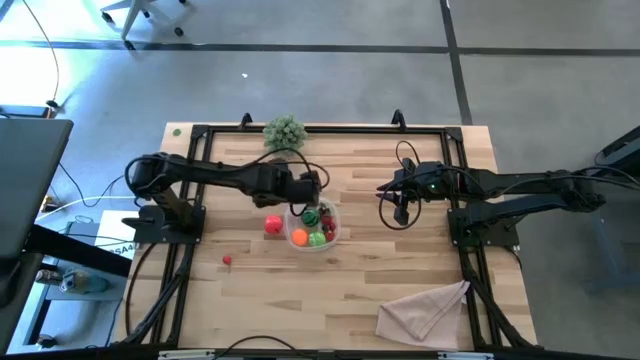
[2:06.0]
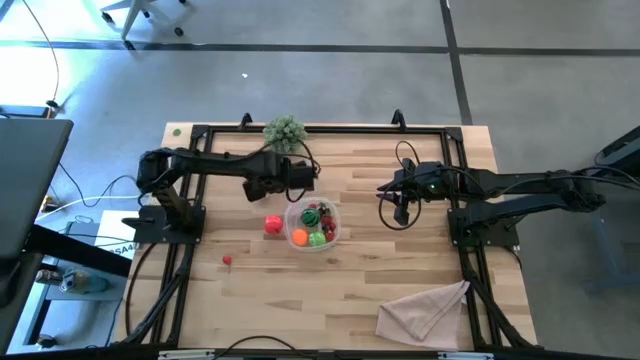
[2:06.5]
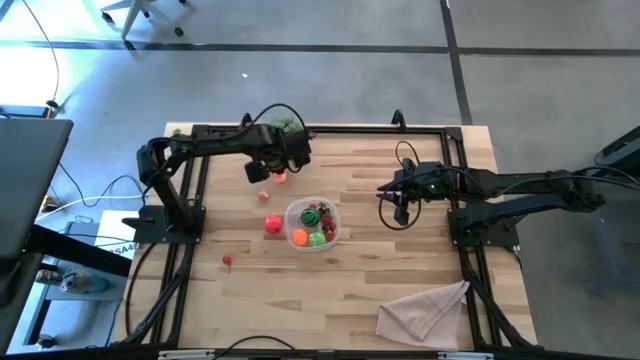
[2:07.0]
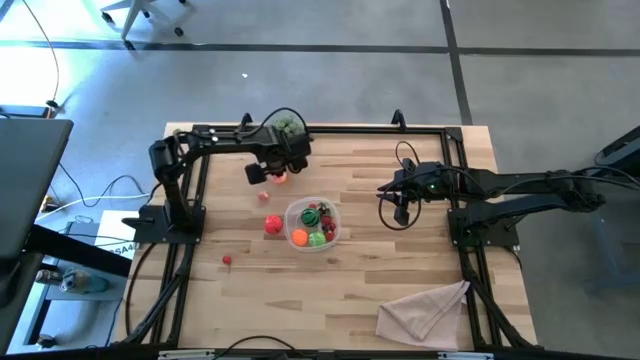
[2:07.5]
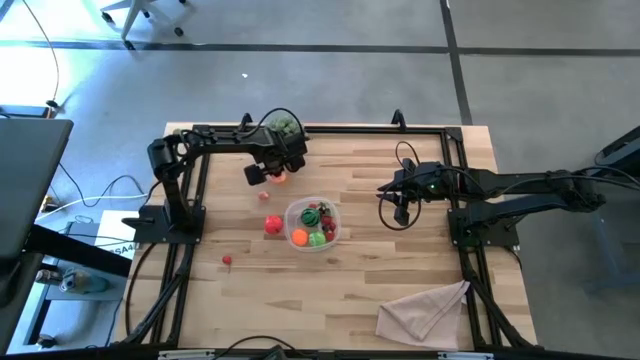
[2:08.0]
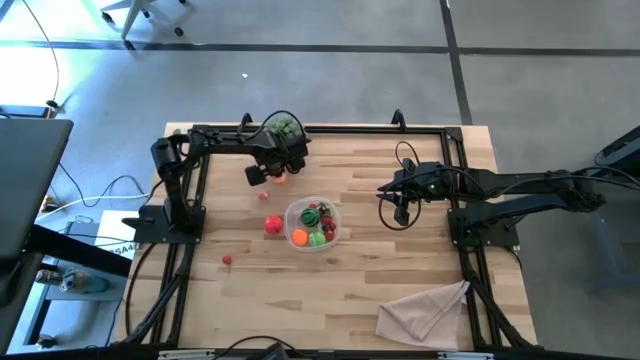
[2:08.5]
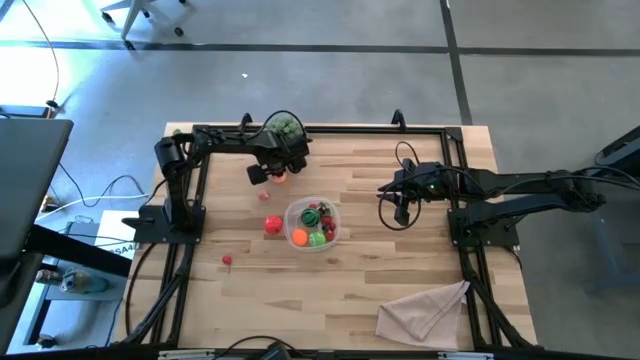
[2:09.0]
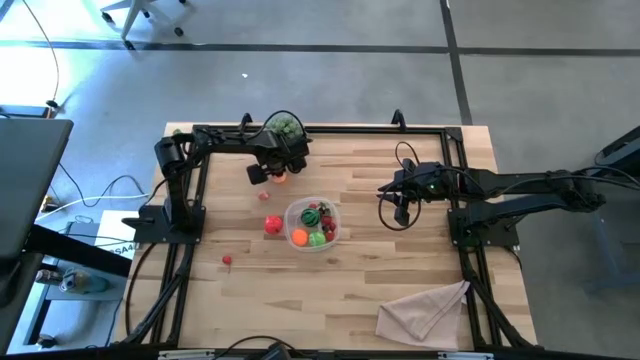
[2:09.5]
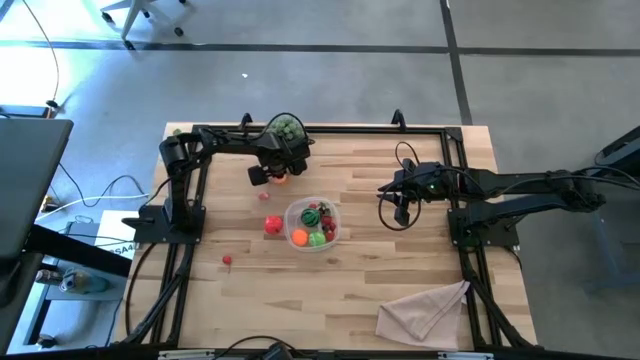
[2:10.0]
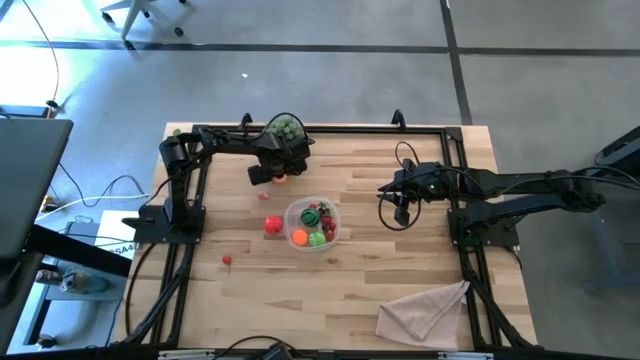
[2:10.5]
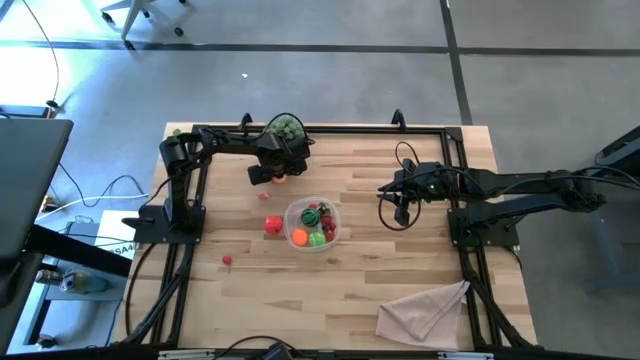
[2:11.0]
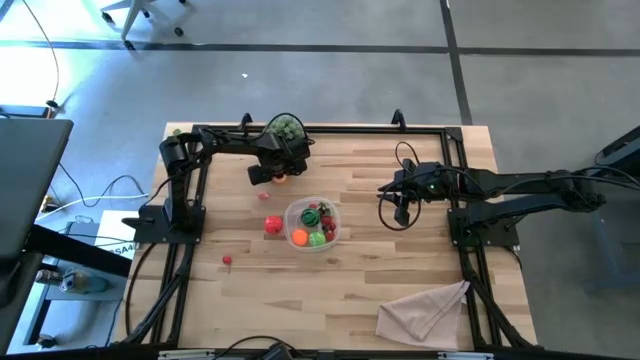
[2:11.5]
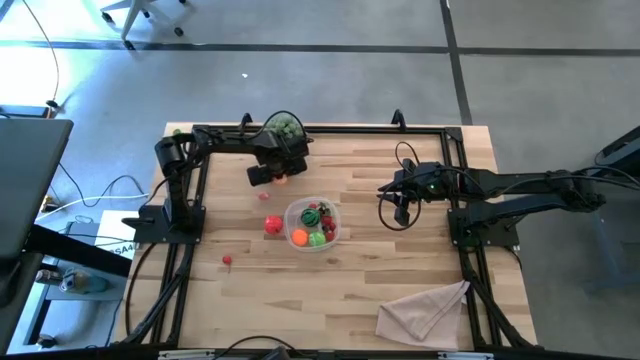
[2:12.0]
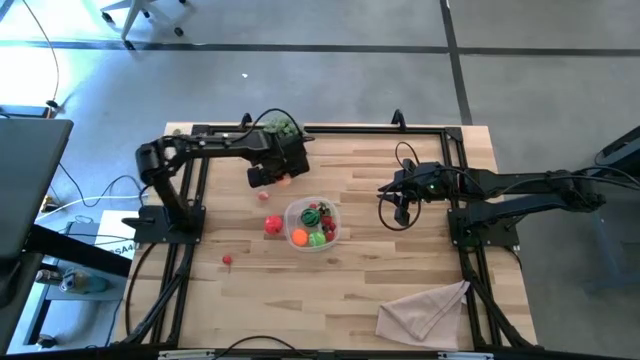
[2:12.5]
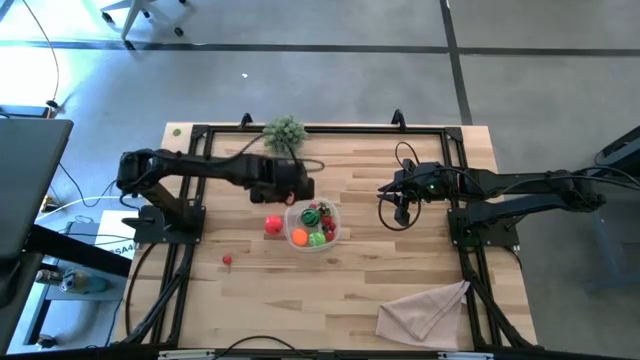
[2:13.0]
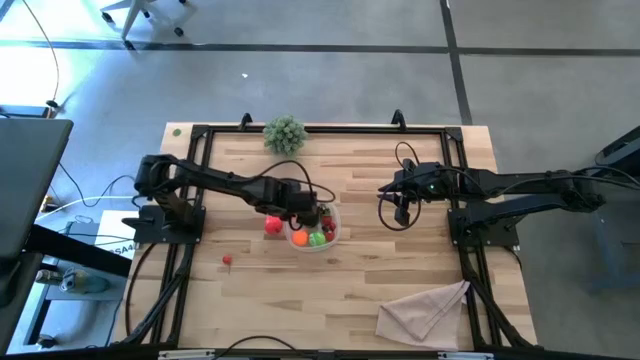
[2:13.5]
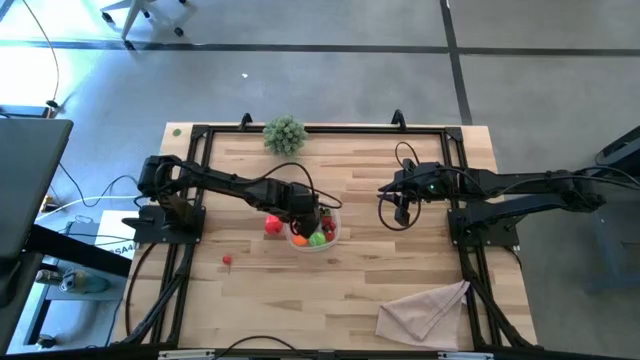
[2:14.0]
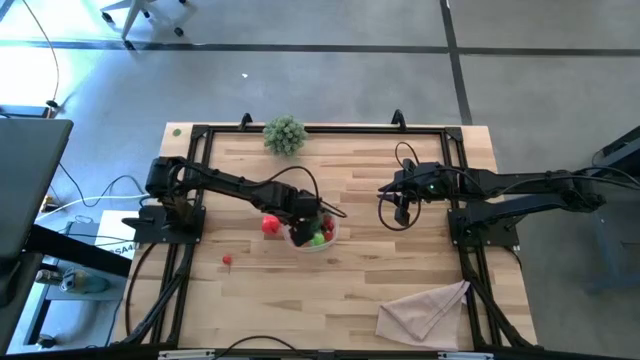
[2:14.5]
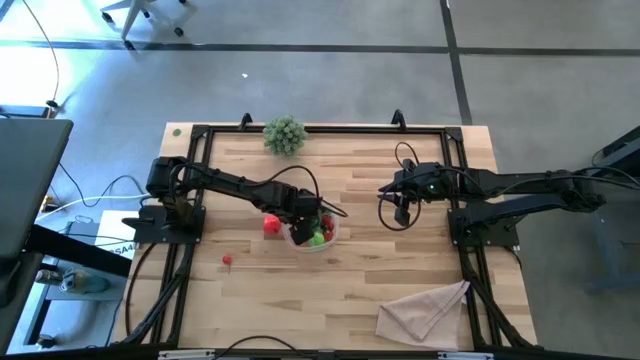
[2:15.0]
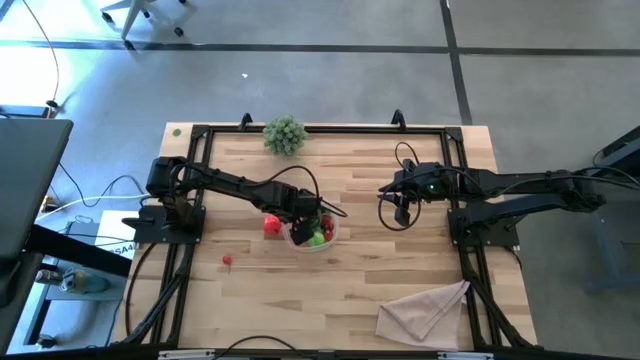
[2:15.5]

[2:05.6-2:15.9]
Task: Pick and placing Produce into tupperware
Put the large peach into the transparent bin

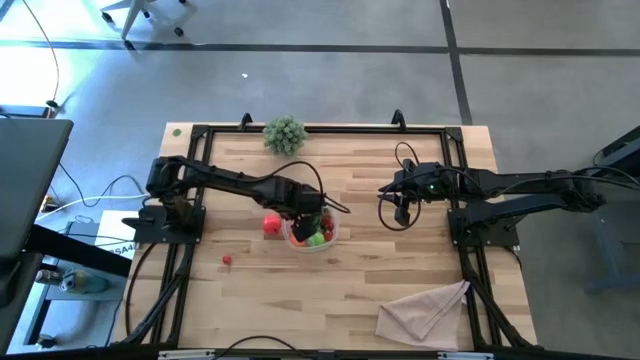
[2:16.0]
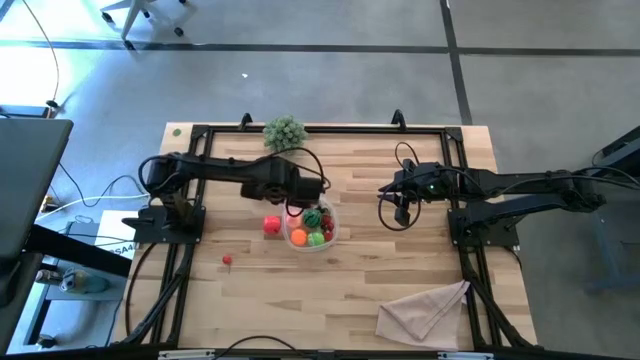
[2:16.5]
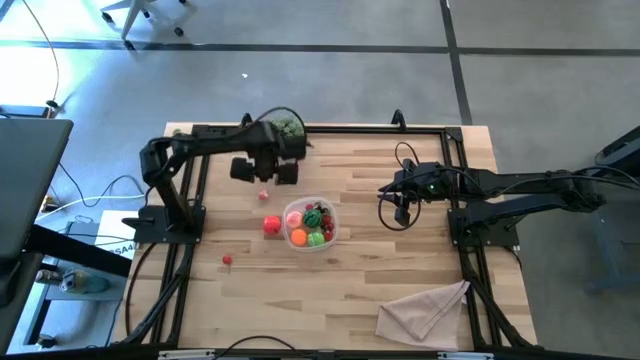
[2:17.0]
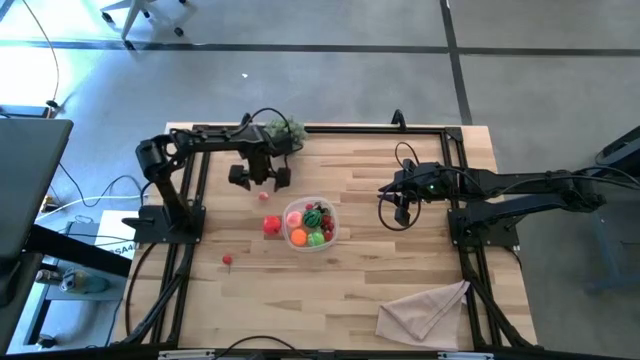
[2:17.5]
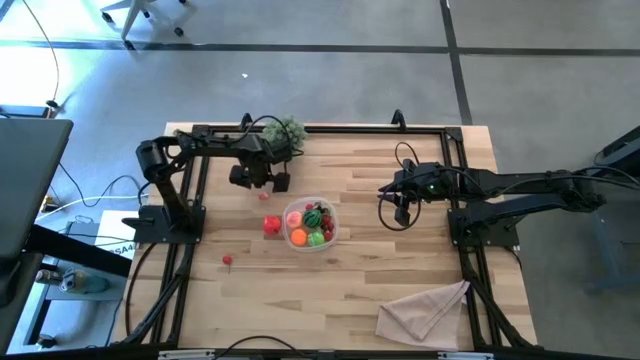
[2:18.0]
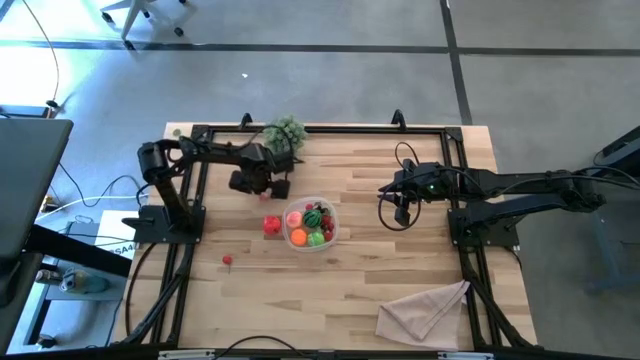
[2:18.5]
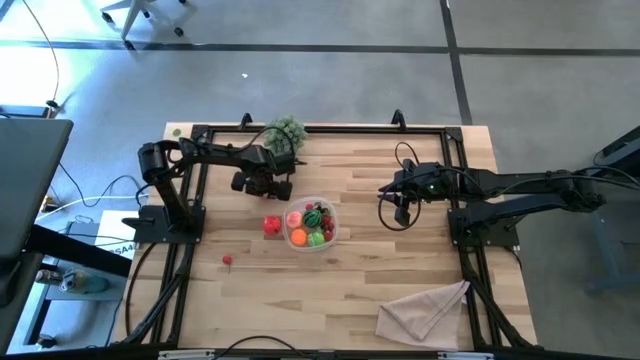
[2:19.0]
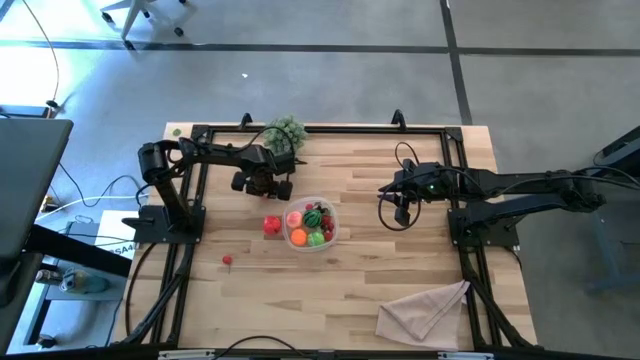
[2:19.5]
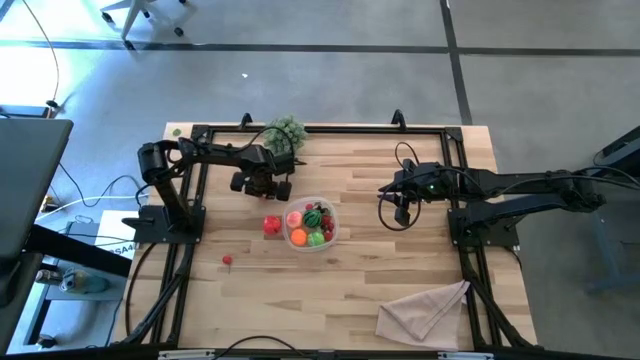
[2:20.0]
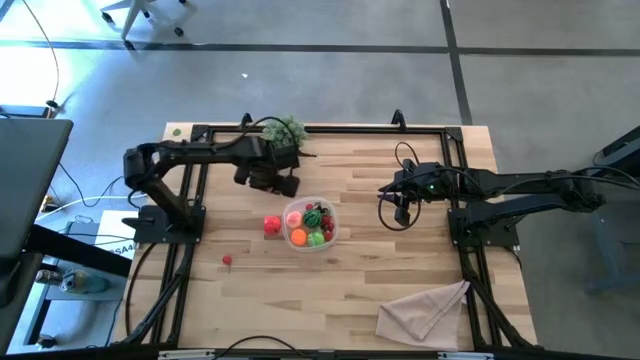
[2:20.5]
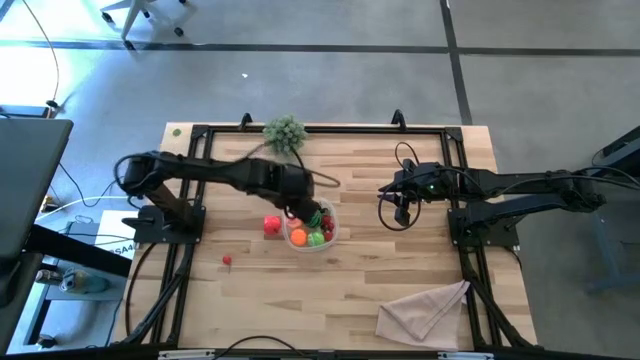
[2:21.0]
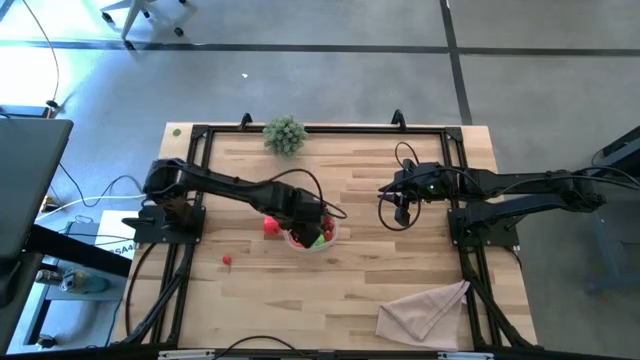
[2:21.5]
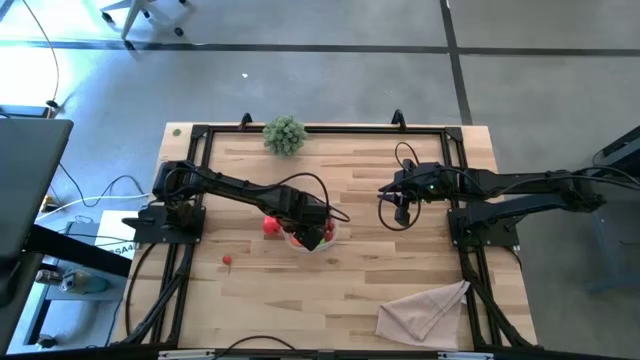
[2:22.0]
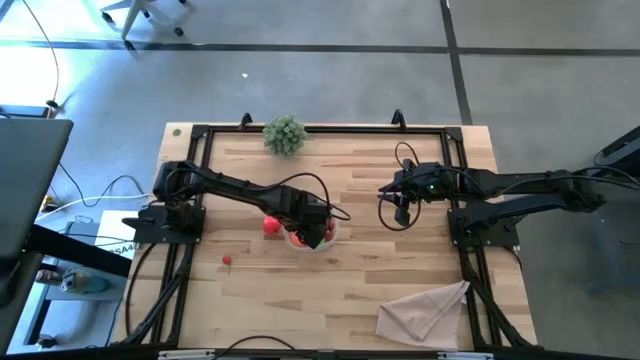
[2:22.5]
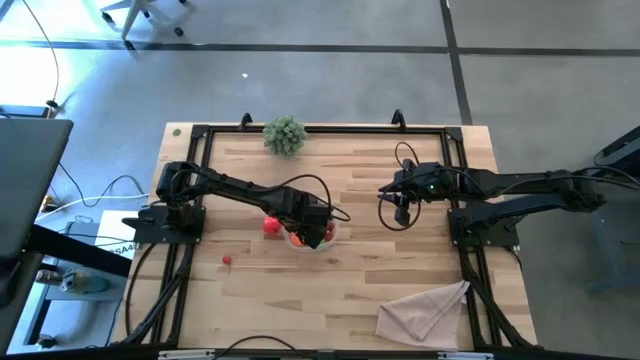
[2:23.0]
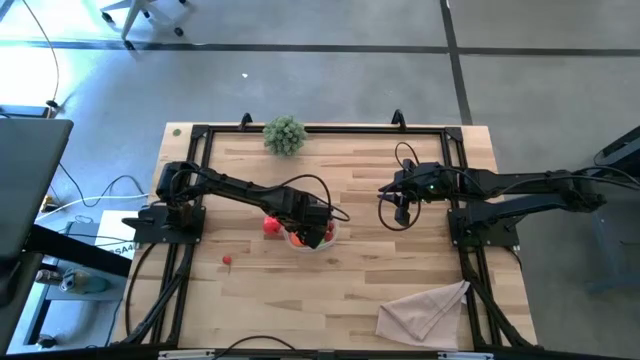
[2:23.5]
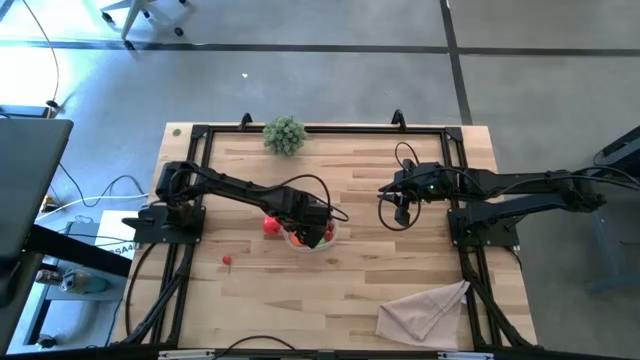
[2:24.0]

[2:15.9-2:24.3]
Put the small peach into the transparent bin

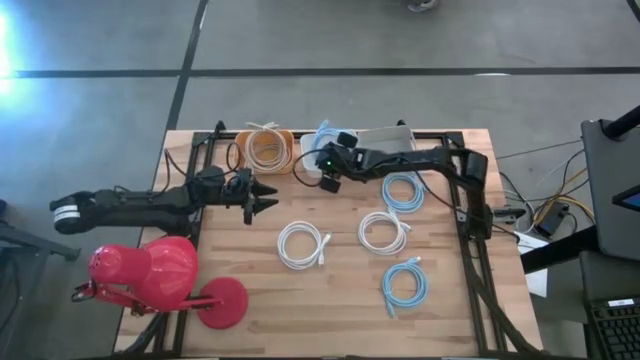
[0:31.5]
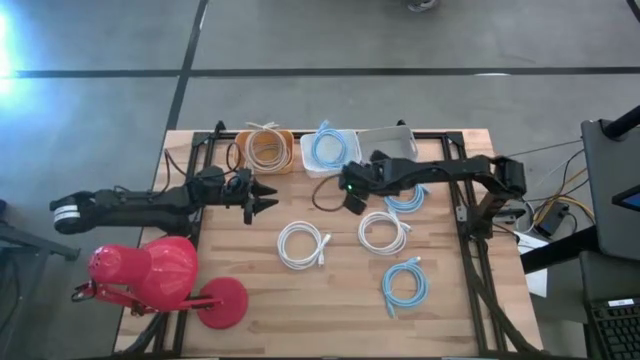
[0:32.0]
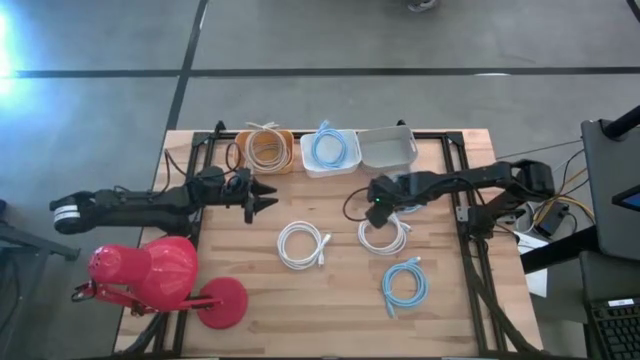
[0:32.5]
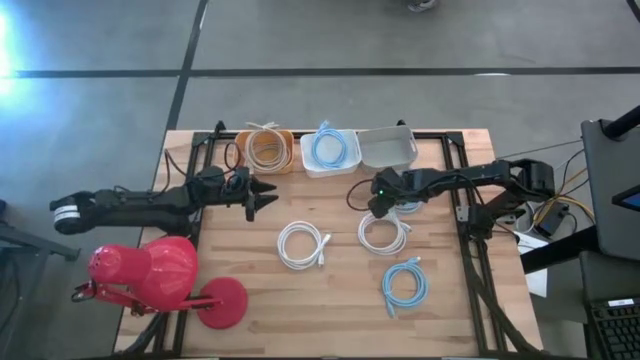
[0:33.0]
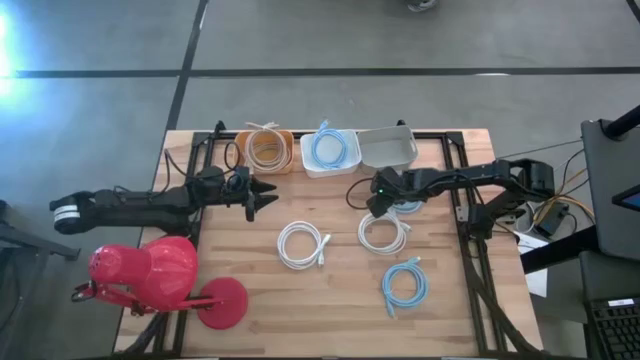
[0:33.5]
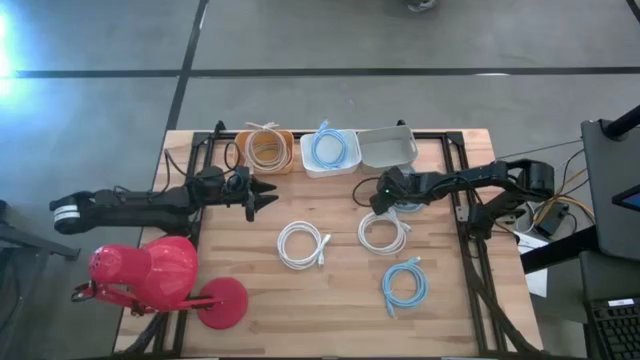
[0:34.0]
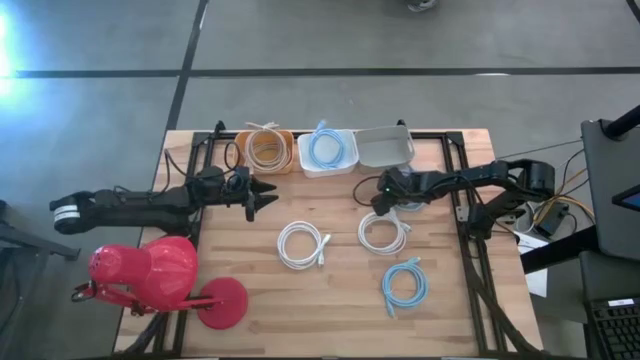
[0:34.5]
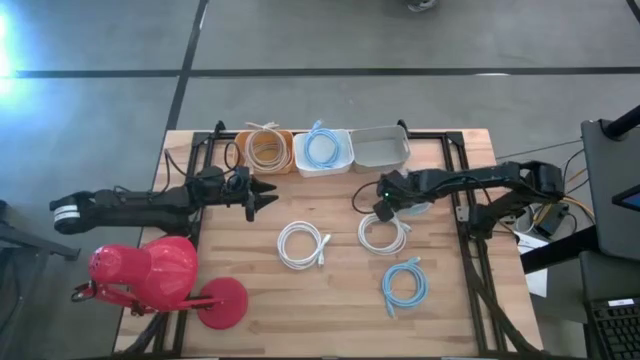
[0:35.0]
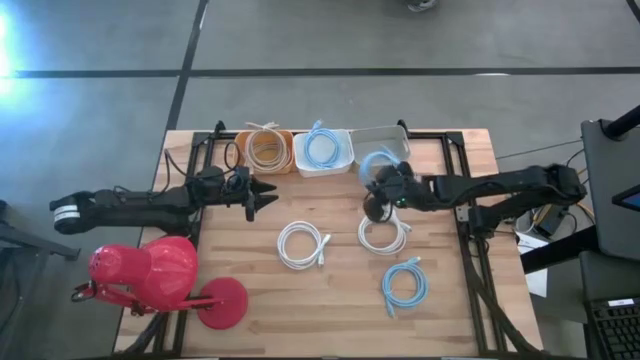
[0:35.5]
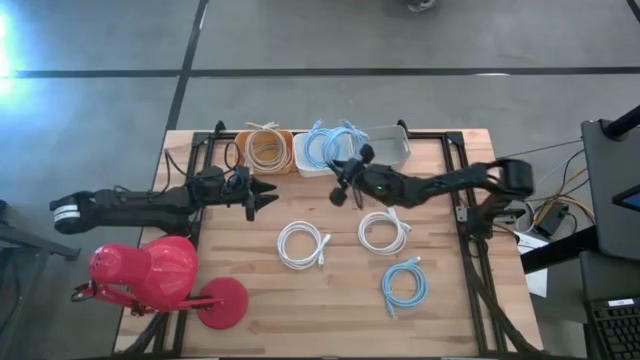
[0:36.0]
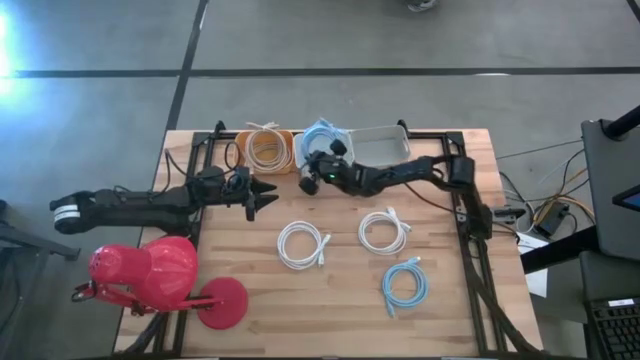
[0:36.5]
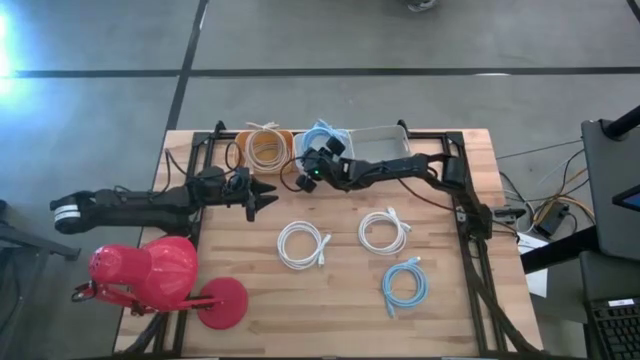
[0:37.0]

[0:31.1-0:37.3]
Task: Sort HDMI cables
Put the blue hdmi cable into the white bin
